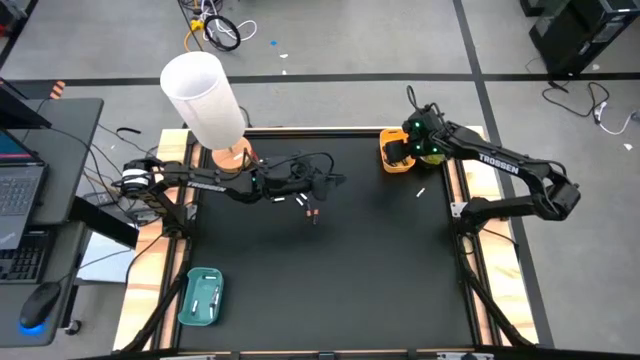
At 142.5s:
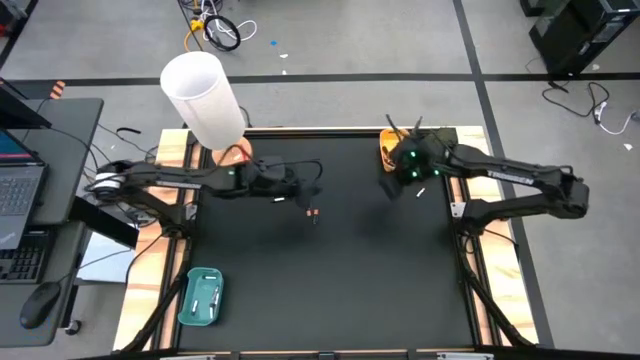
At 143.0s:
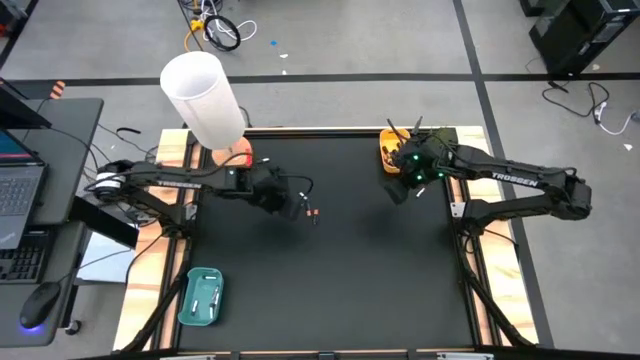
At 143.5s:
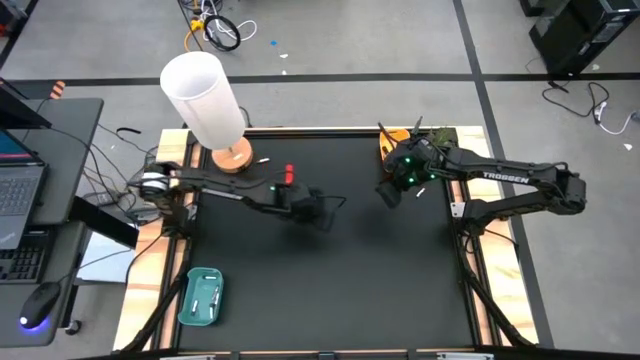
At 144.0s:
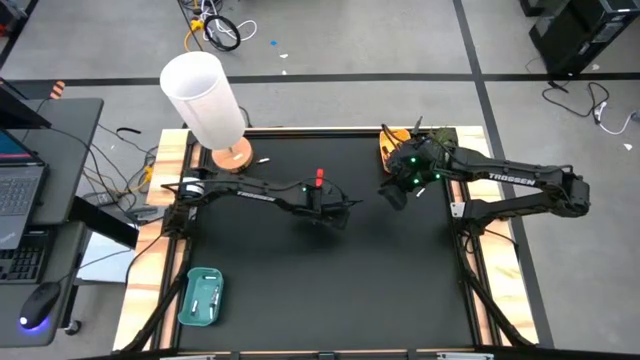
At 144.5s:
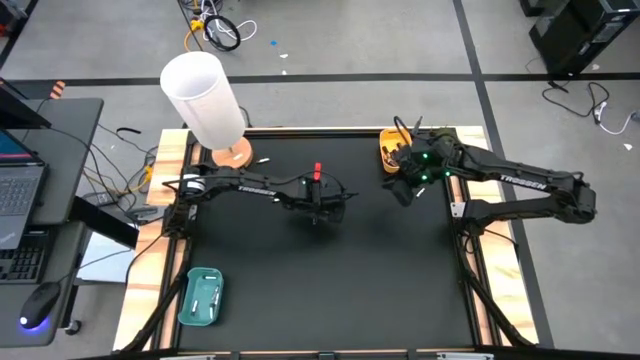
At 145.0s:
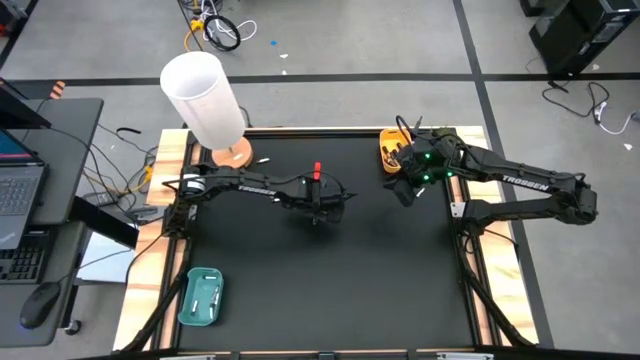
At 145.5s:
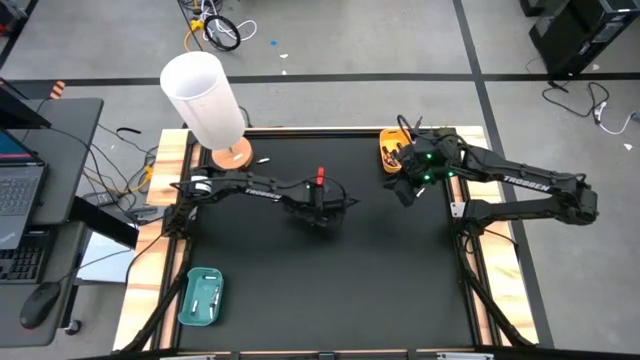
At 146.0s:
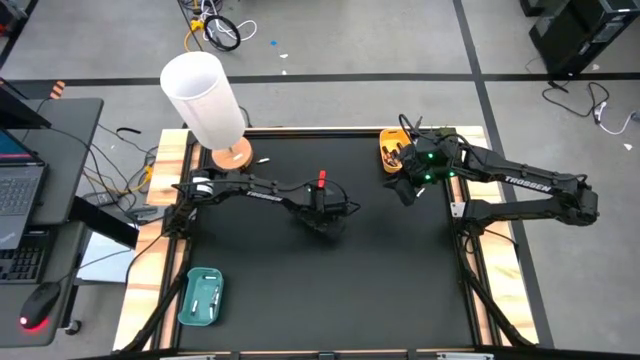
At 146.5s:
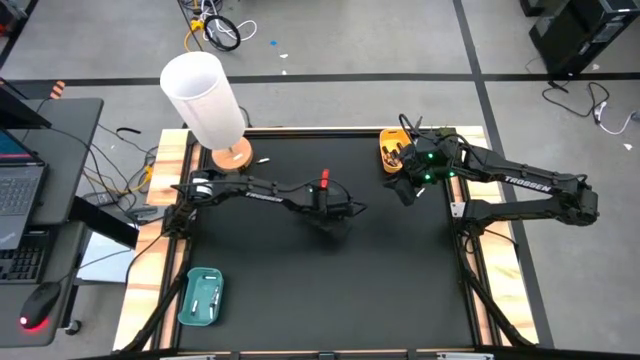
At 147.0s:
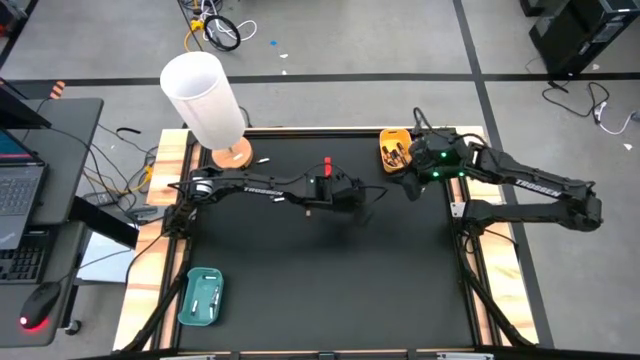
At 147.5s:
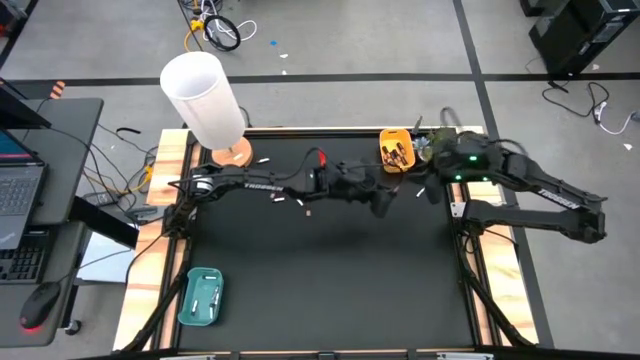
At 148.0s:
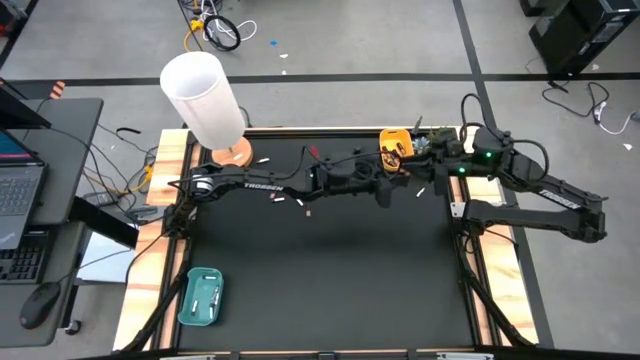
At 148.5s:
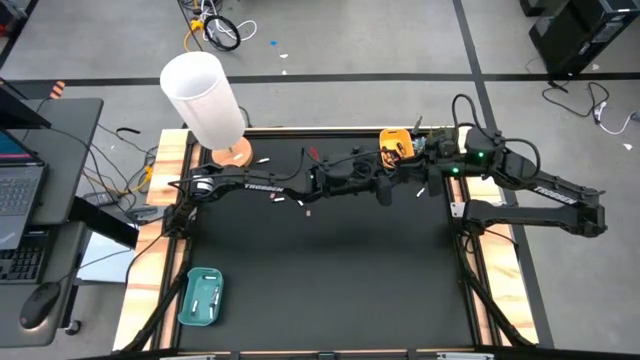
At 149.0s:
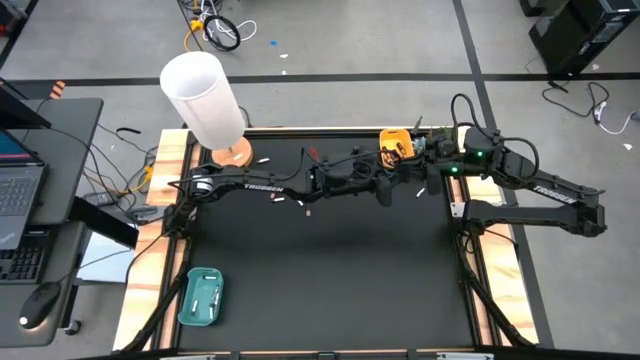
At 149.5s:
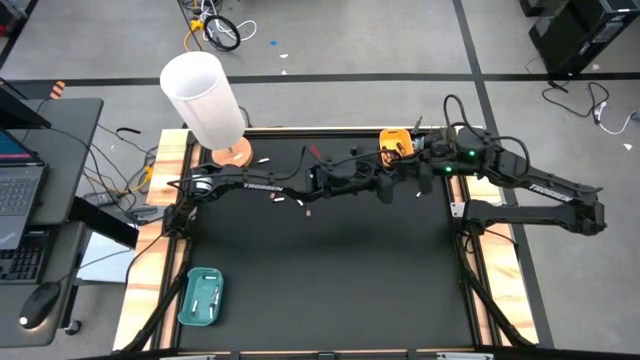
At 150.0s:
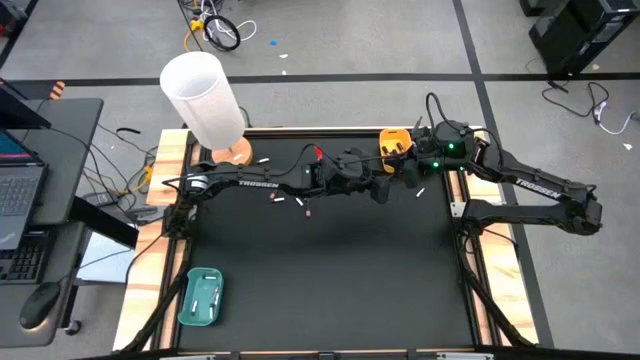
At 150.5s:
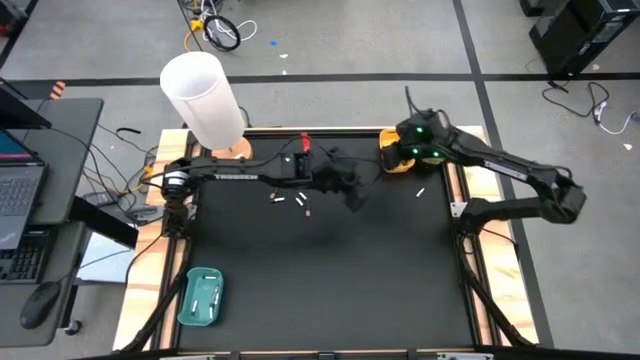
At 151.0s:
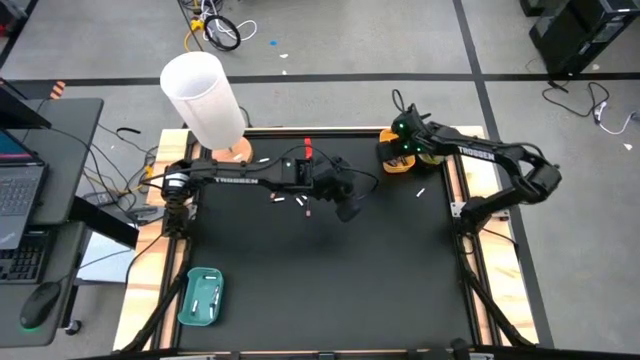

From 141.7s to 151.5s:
Task: Sort batteries
Put the right black battery into the yellow bin

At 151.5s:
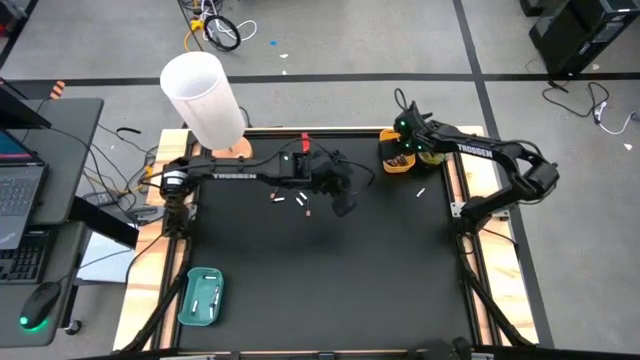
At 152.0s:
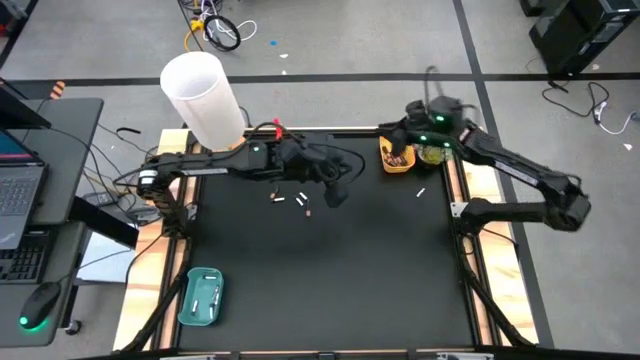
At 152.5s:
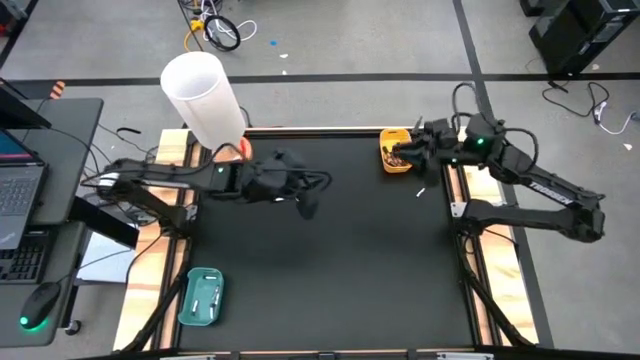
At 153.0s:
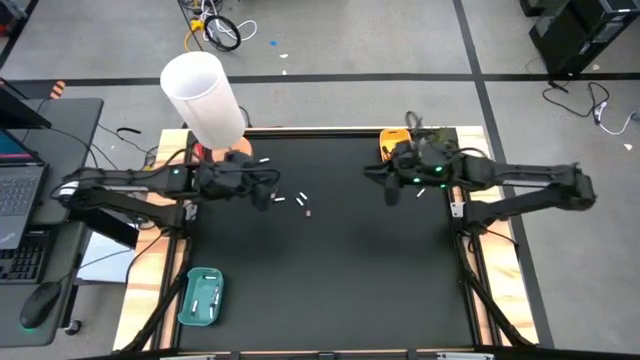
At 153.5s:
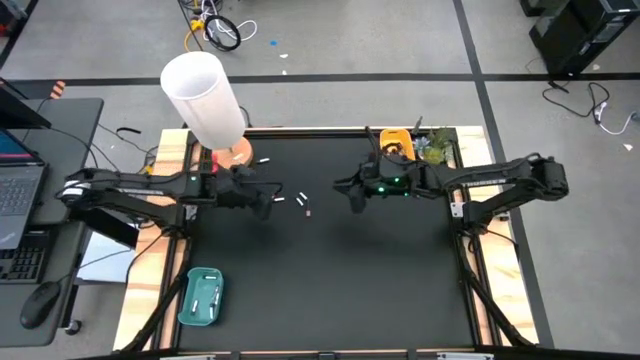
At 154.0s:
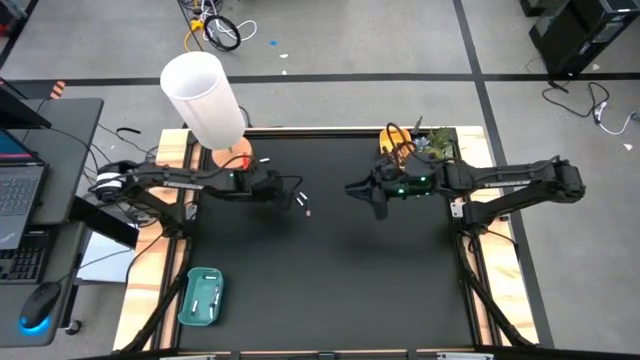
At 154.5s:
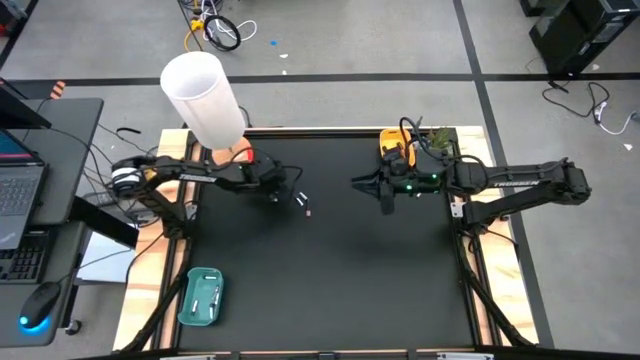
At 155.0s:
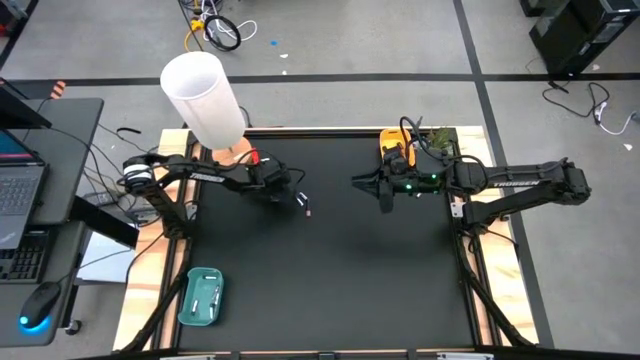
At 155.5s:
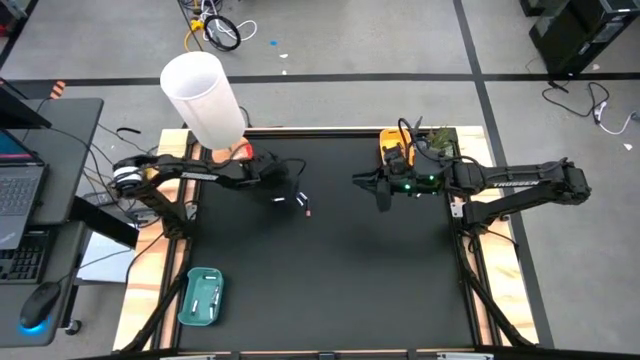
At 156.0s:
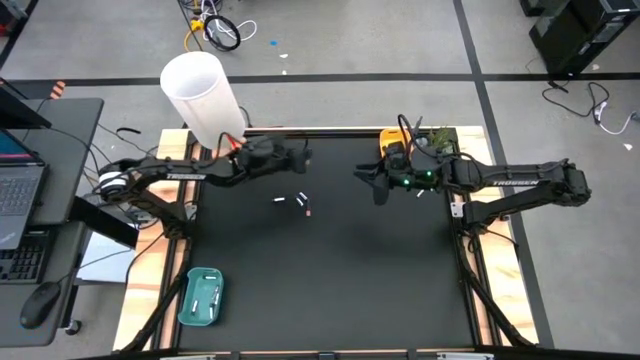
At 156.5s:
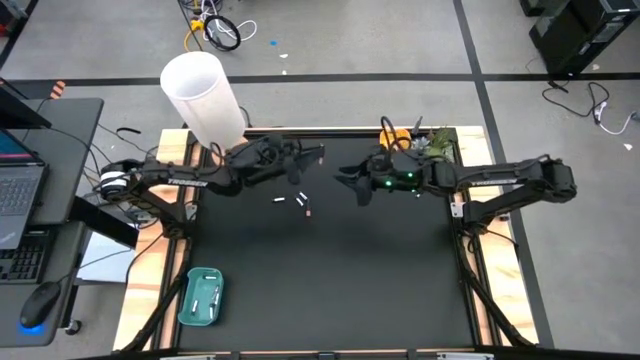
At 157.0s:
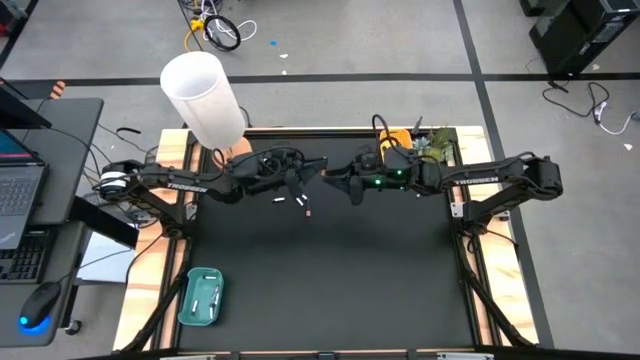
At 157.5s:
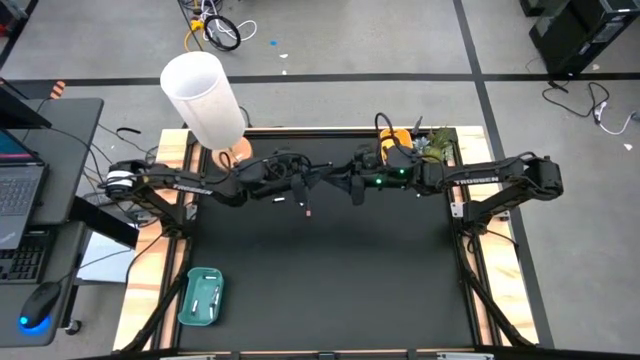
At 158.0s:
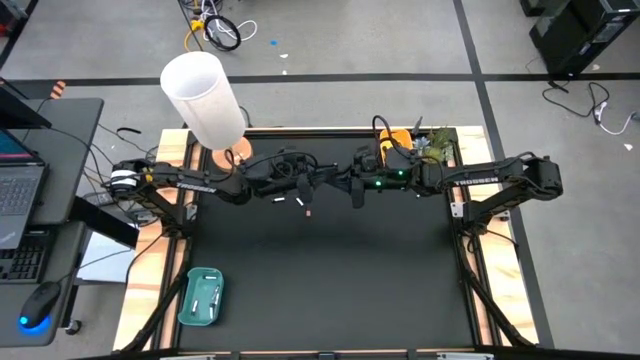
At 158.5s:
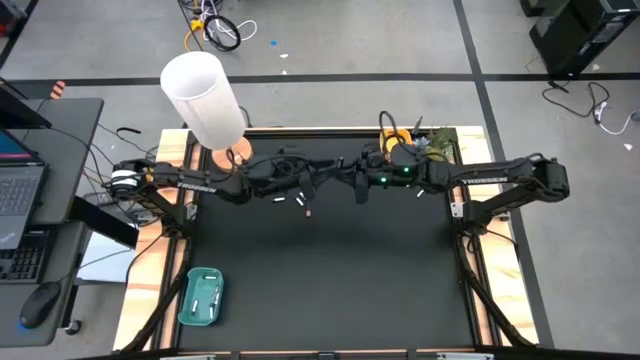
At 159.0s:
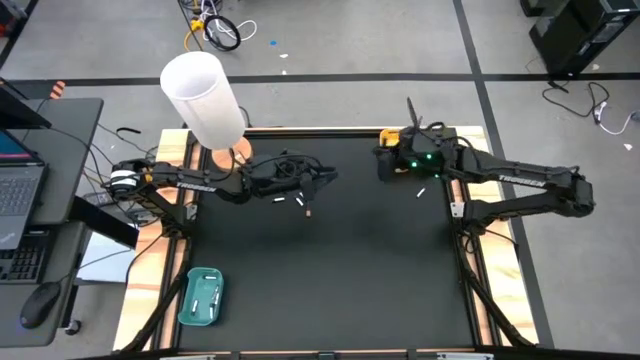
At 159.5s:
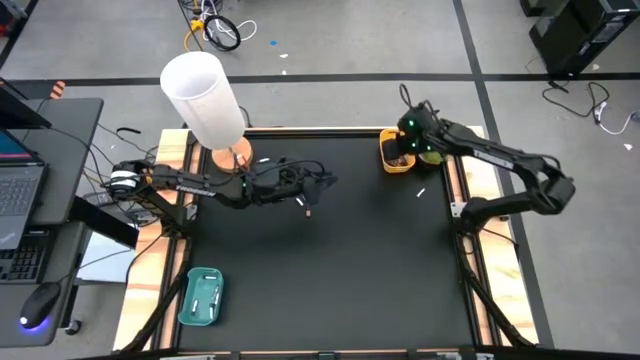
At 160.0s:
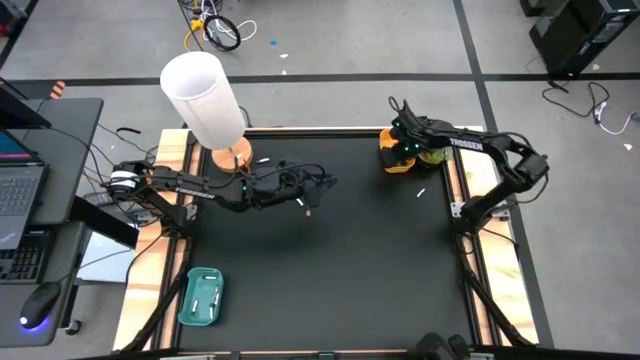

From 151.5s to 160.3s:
Put the left black battery into the yellow bin

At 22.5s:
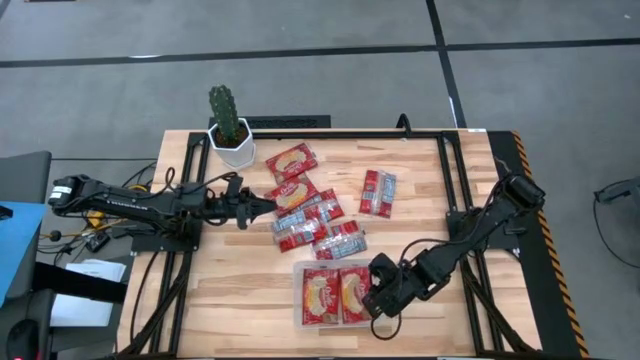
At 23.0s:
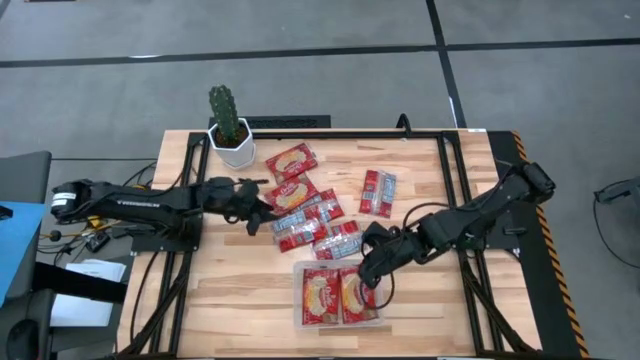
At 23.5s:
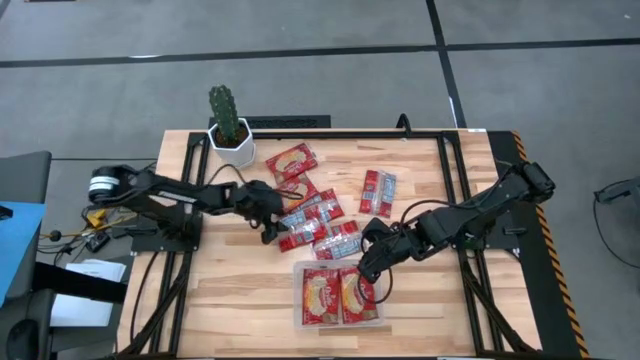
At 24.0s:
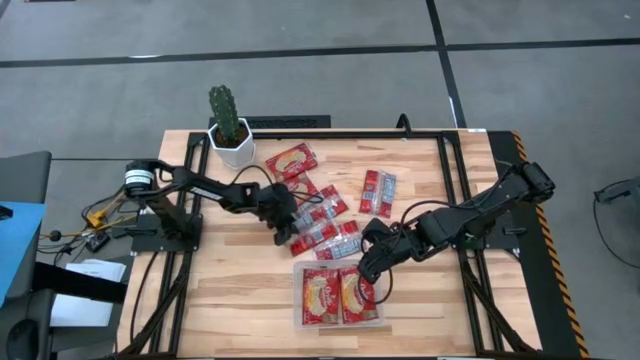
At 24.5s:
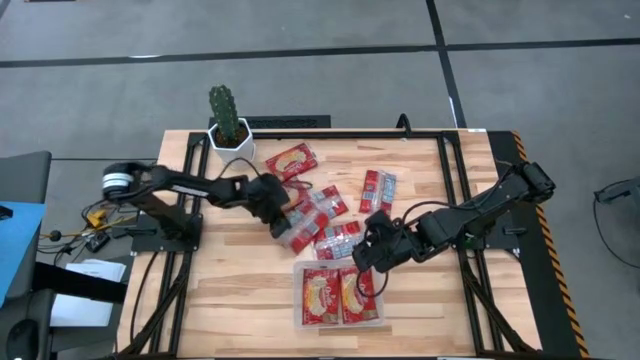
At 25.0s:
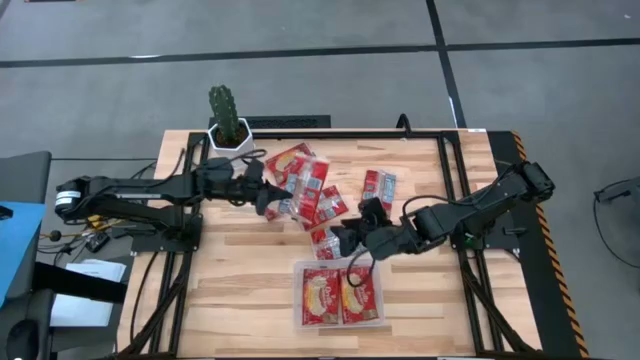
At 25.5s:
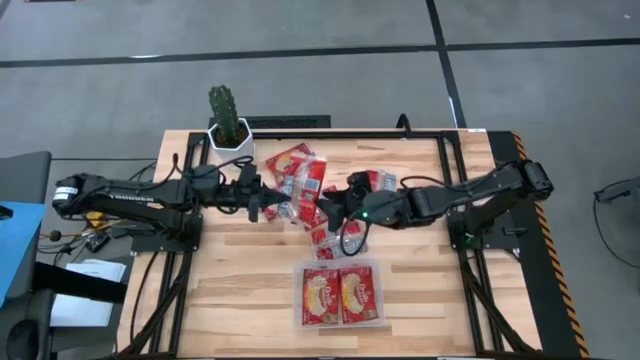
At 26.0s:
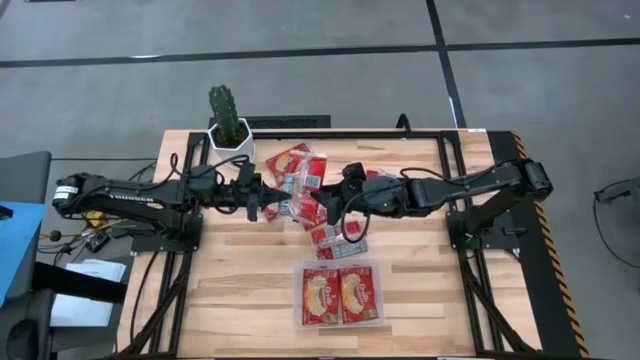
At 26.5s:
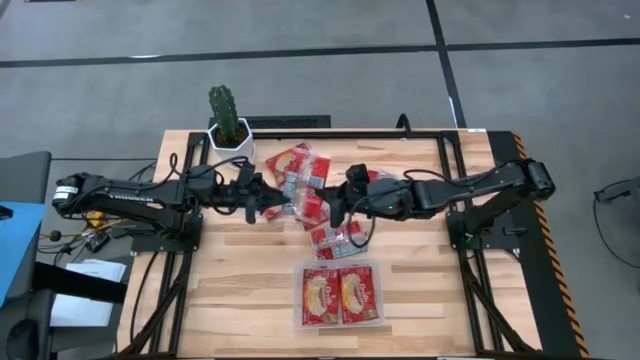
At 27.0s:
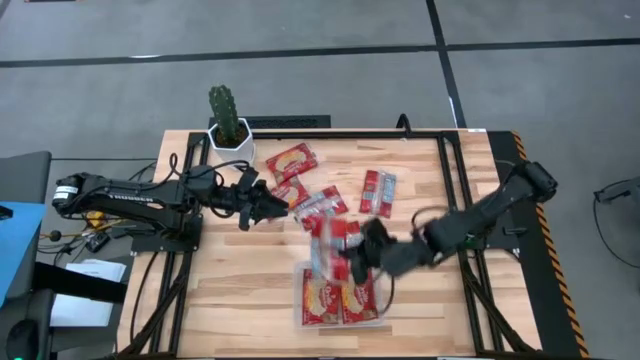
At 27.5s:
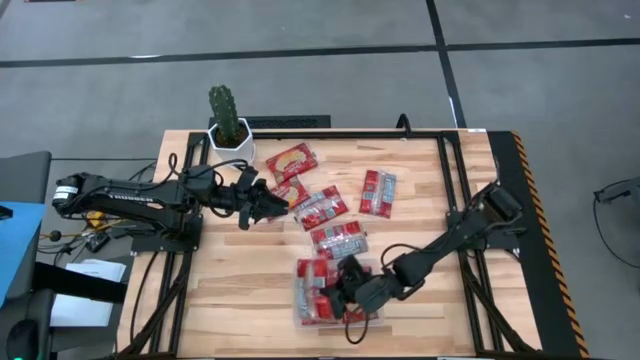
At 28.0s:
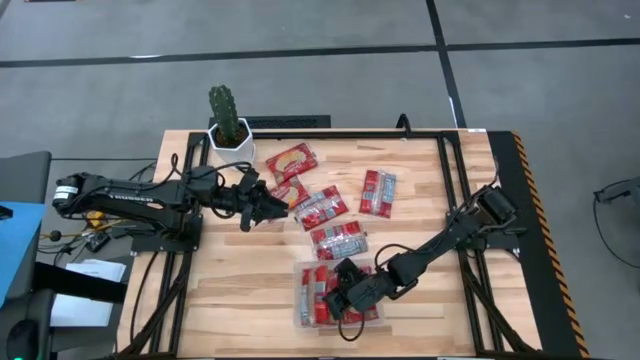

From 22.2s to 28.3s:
Task: Sort popcorn bags into baskets
Put the red popcorn bag into the transparent bin
